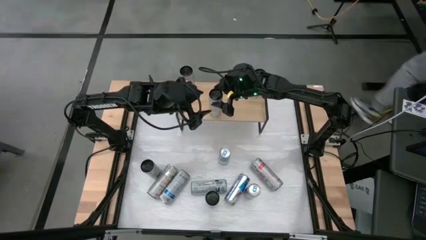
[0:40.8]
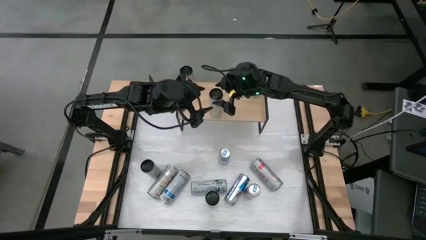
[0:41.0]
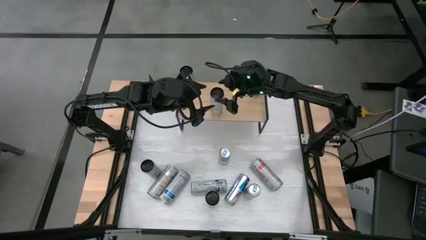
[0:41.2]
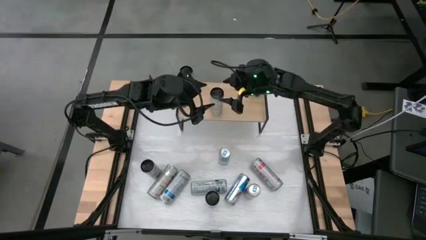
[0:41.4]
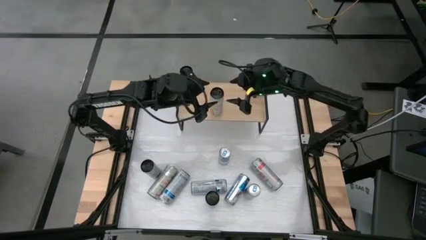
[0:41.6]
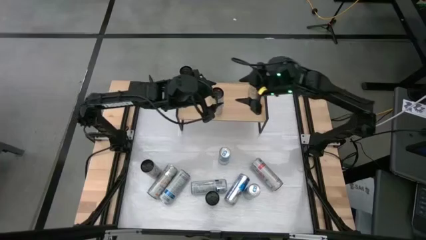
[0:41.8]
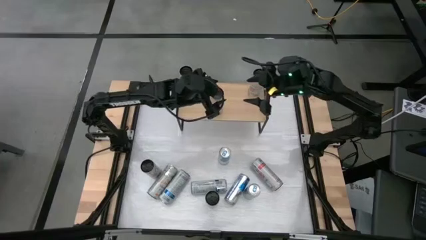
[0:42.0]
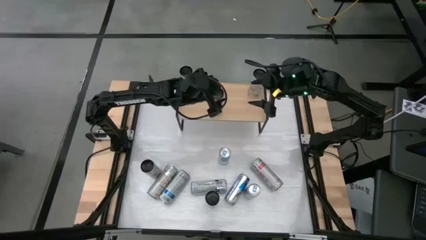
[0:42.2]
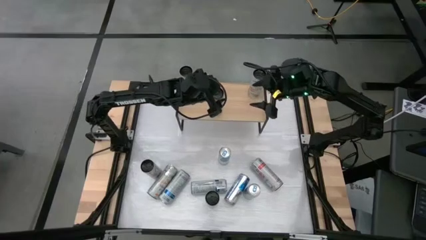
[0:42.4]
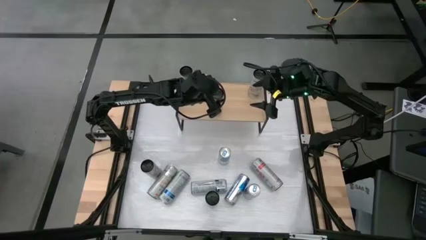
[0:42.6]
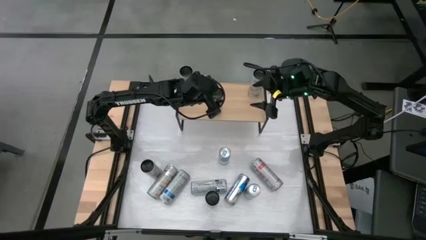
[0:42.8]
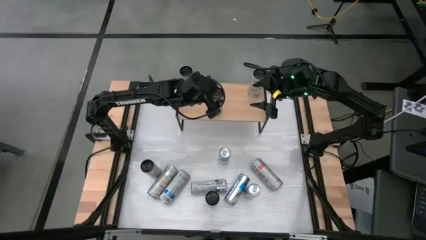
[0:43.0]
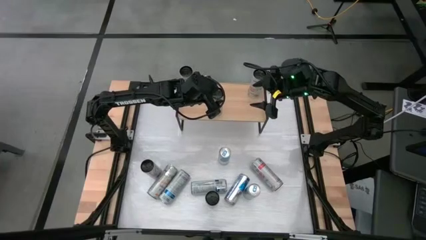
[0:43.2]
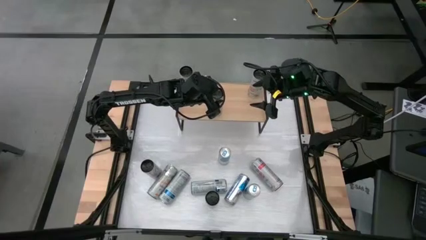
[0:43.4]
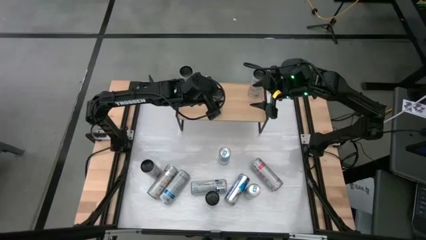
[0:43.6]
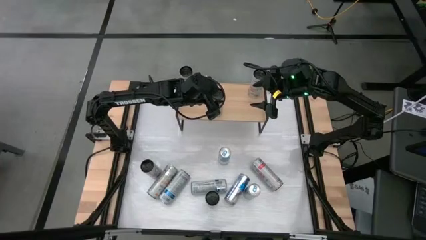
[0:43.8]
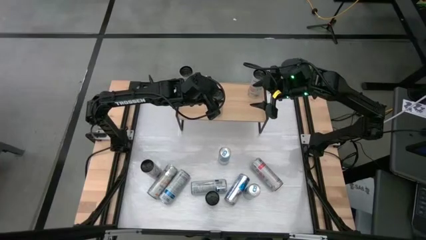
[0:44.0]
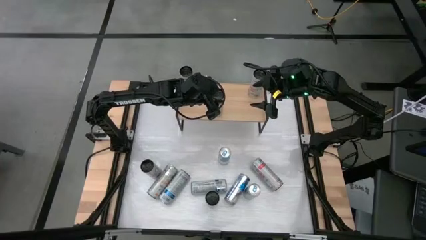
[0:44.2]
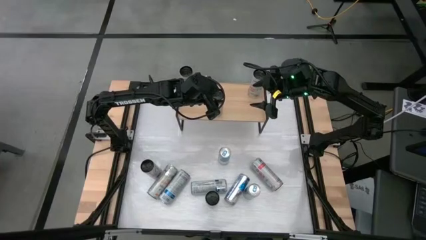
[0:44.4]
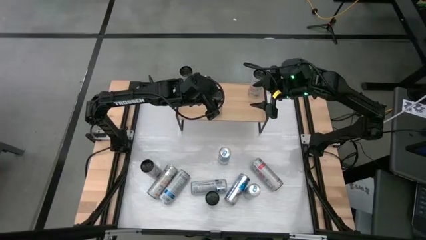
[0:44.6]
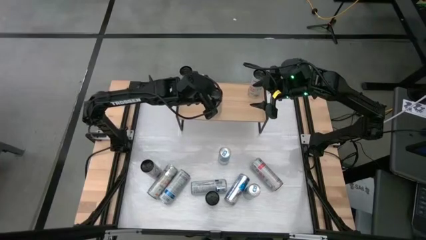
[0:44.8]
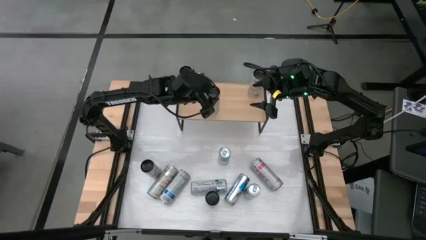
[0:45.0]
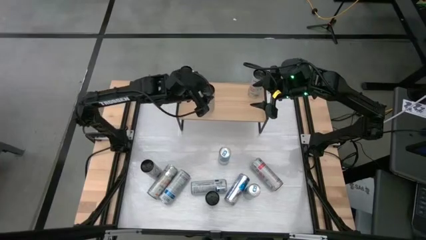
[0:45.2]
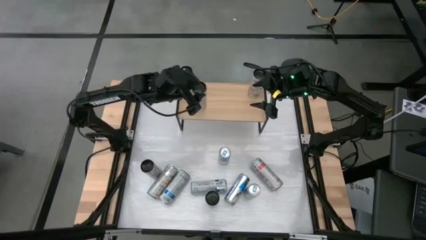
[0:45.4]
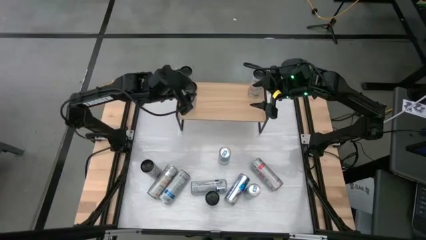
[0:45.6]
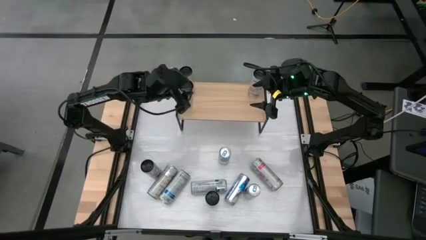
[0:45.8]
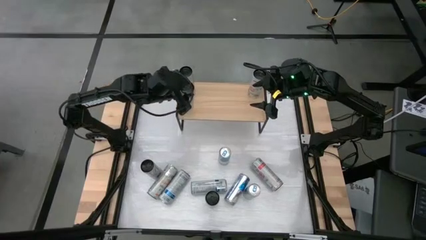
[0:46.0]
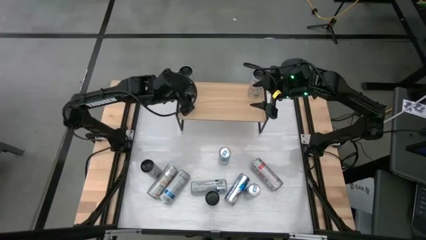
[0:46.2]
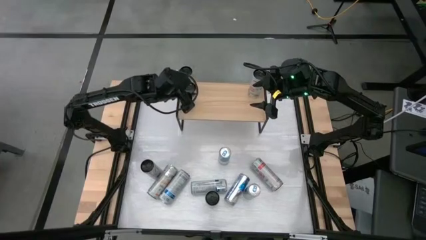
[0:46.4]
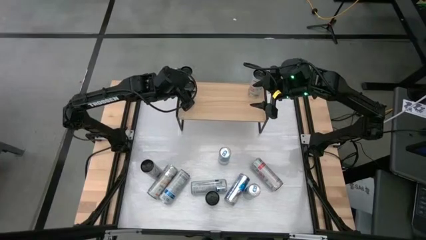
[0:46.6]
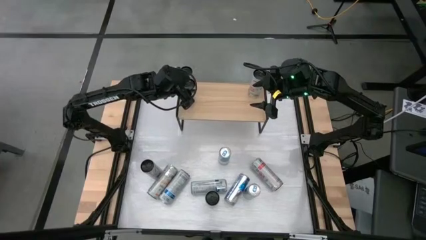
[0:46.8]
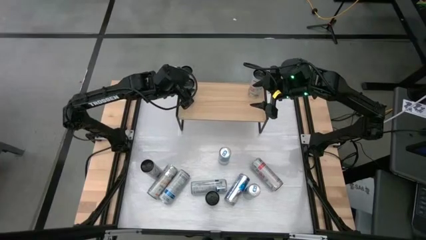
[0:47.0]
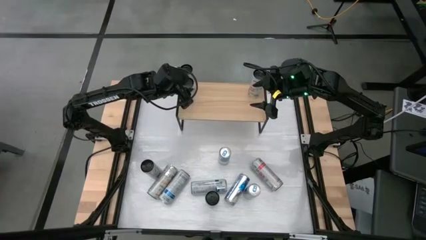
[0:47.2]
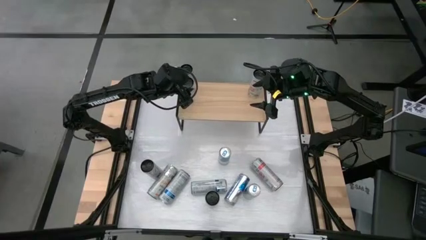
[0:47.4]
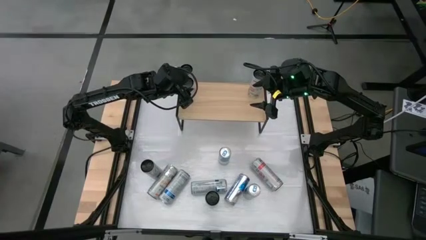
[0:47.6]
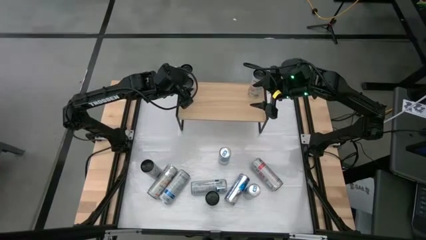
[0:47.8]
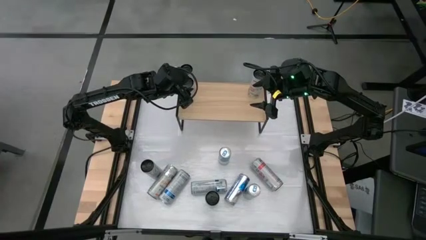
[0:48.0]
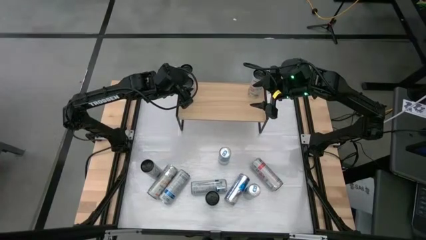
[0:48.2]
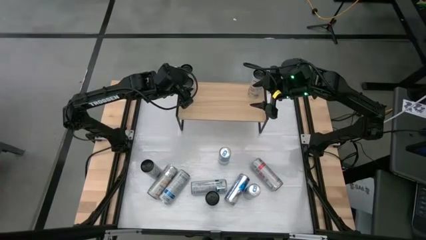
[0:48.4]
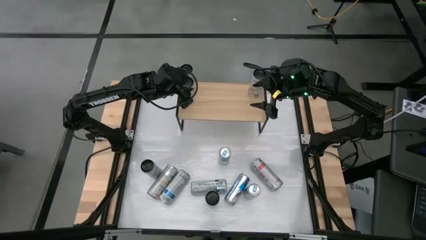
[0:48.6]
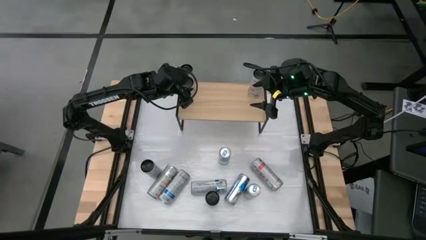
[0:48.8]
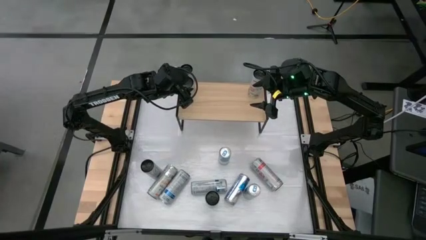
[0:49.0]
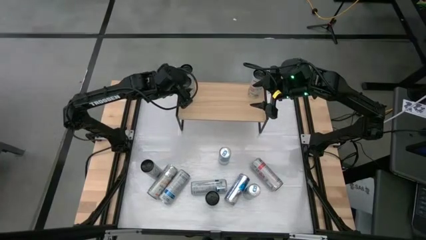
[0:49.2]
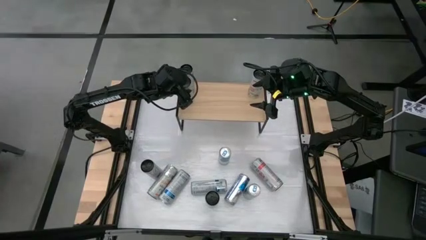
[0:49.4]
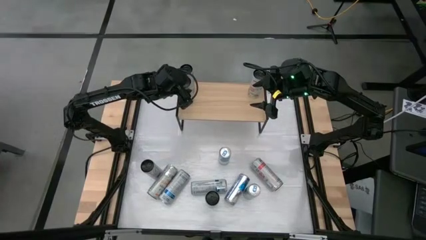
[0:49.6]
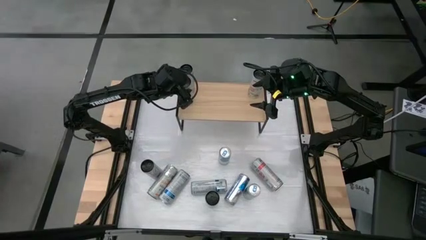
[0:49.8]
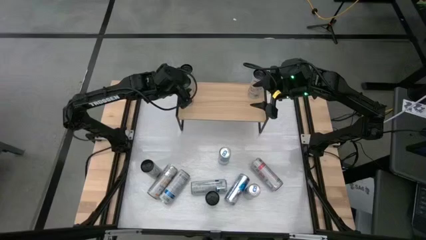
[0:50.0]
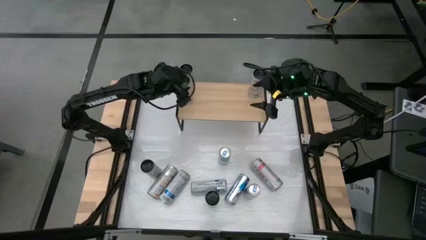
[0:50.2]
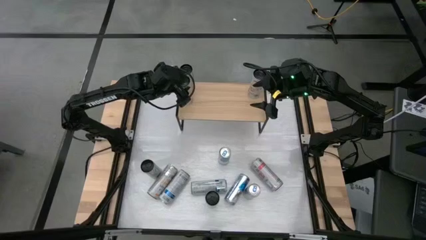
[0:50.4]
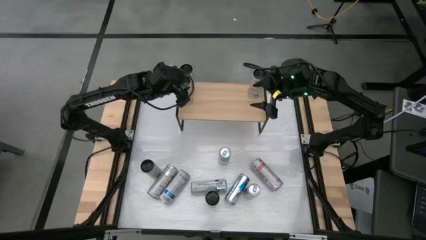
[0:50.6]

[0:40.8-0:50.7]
Task: Sort soda cans
Put the right white yellow soda can on the shelf and align with other white yellow soda cans
